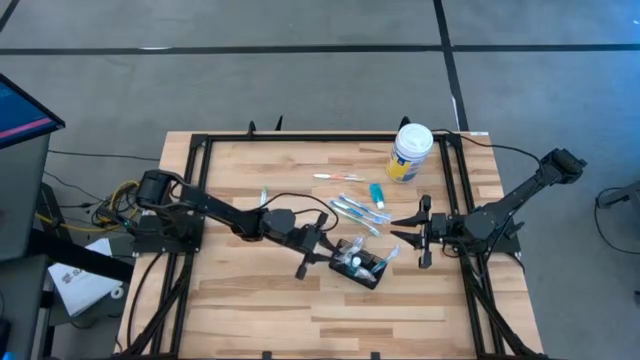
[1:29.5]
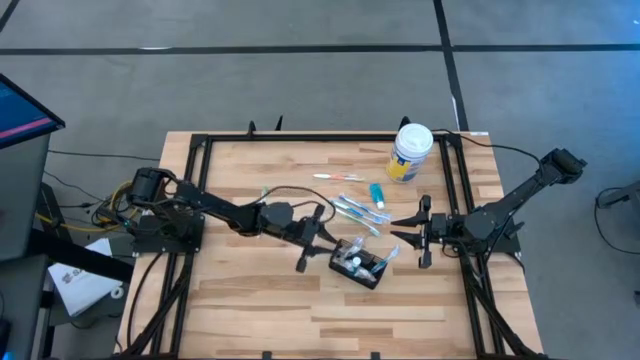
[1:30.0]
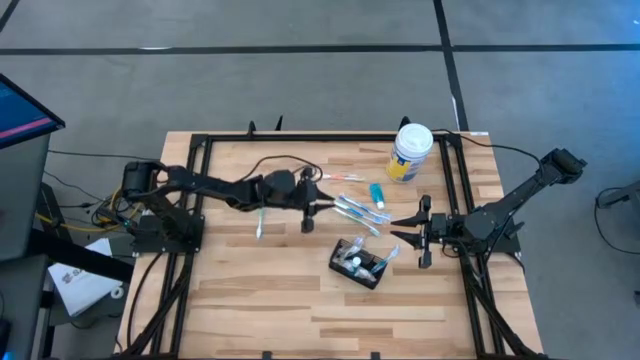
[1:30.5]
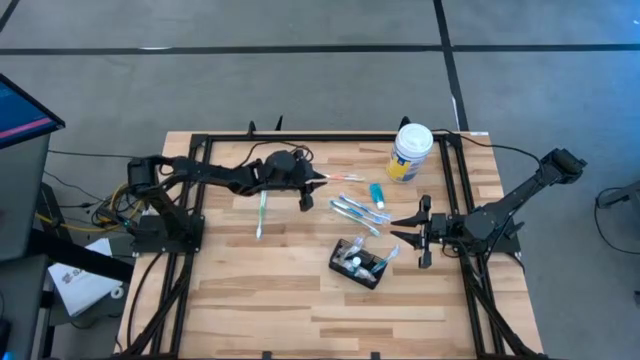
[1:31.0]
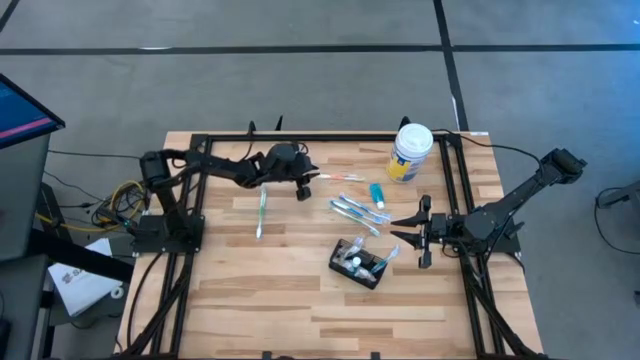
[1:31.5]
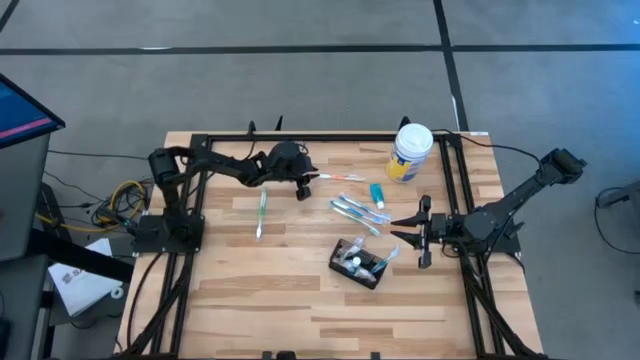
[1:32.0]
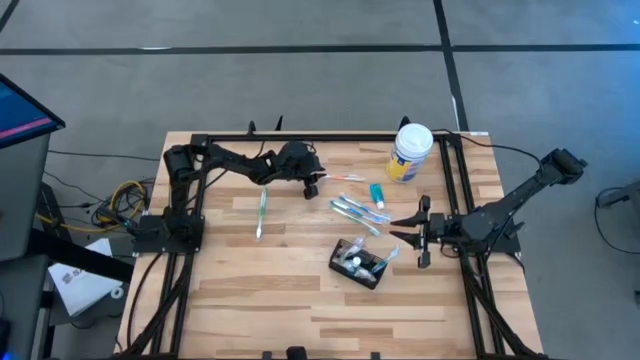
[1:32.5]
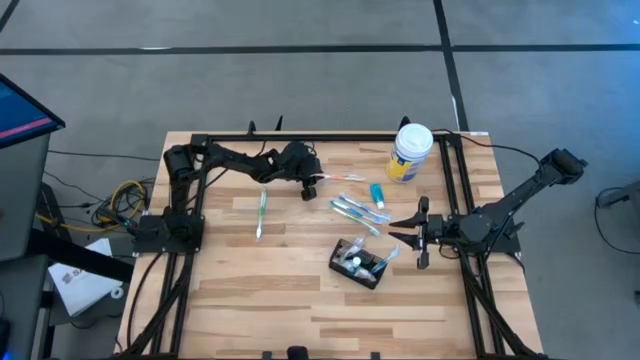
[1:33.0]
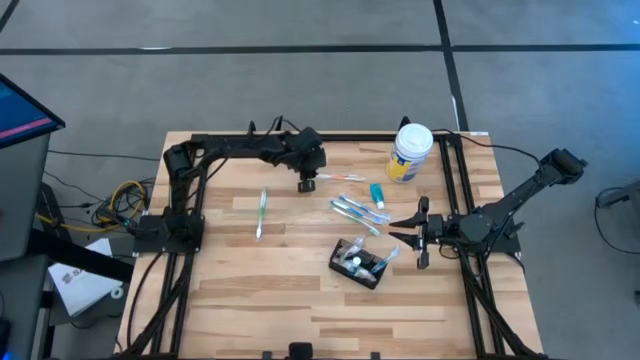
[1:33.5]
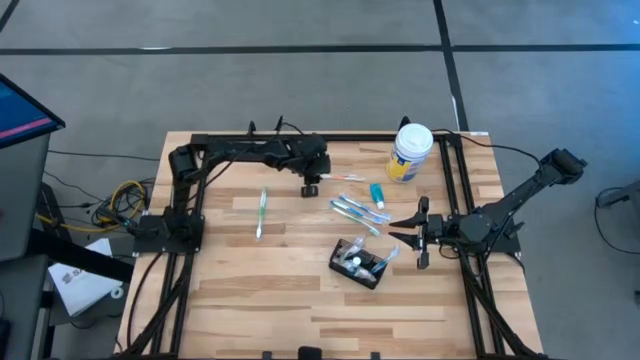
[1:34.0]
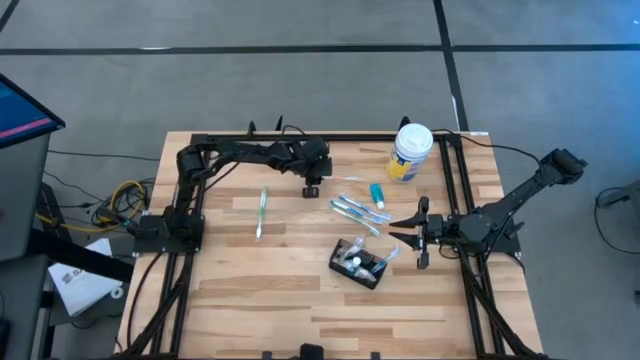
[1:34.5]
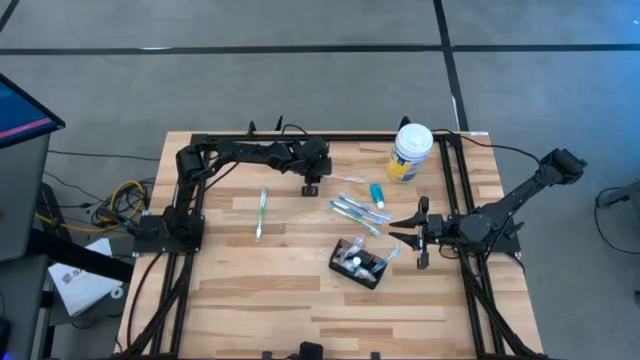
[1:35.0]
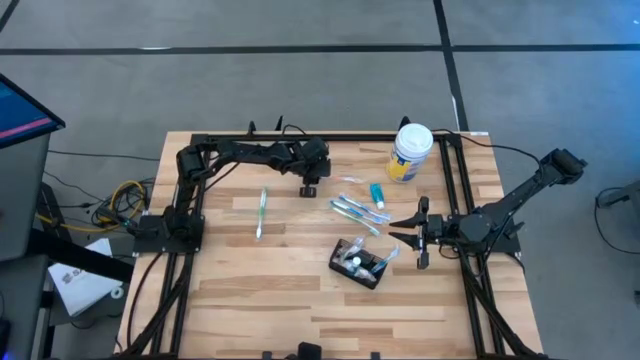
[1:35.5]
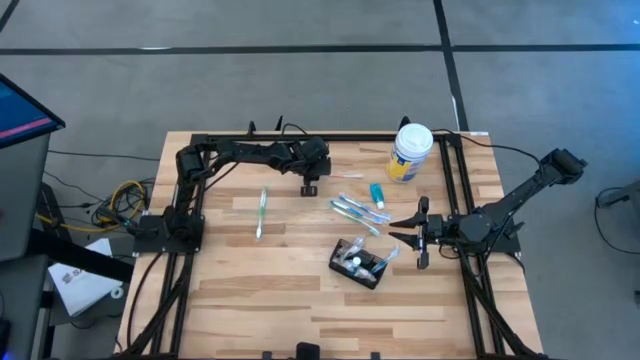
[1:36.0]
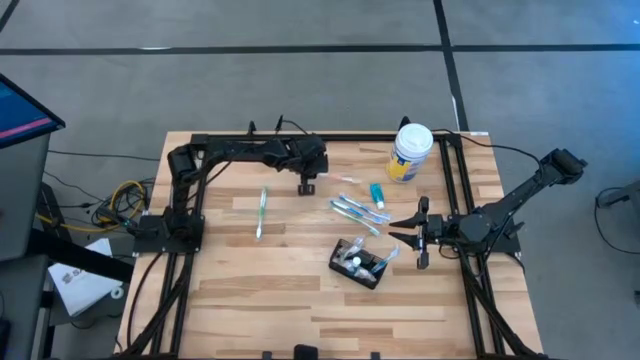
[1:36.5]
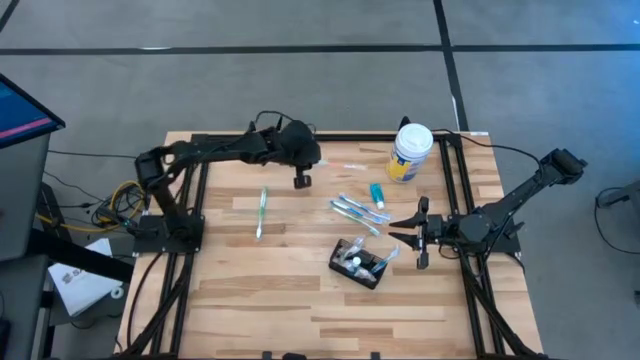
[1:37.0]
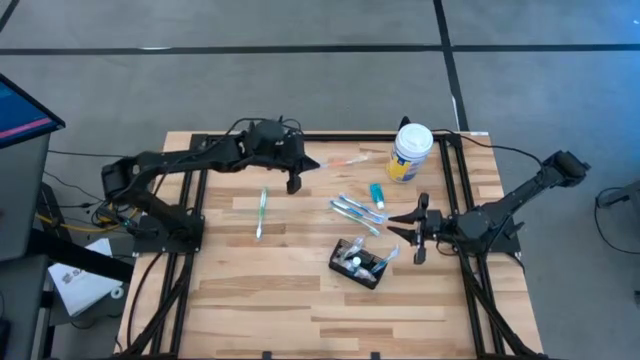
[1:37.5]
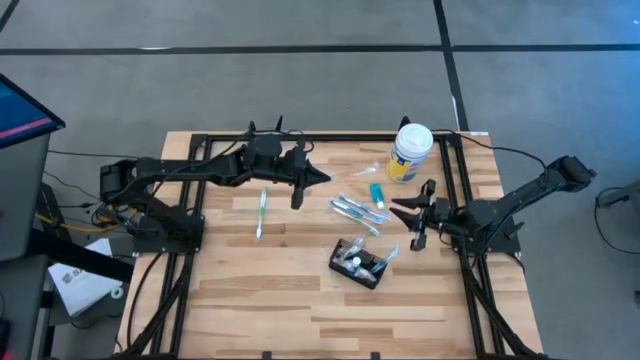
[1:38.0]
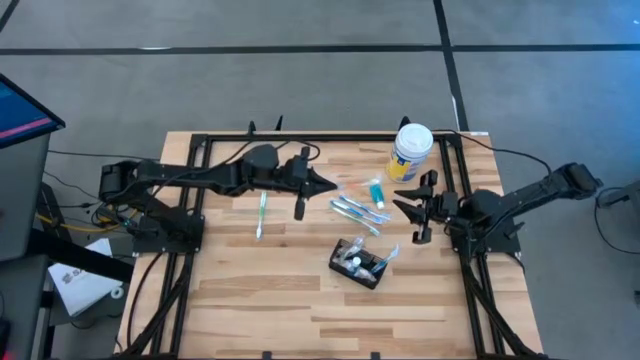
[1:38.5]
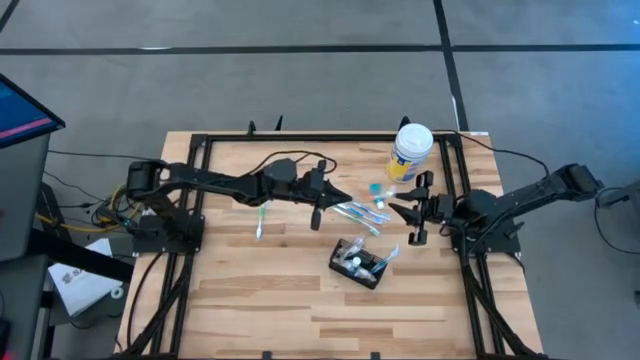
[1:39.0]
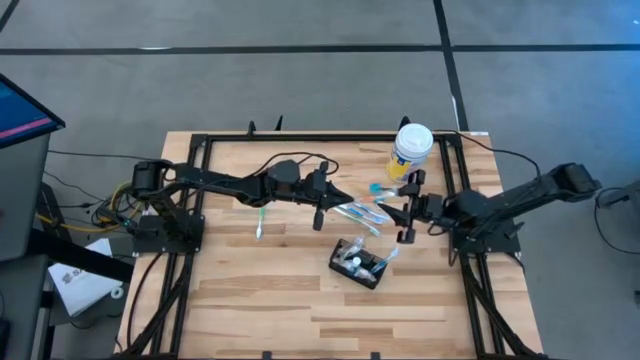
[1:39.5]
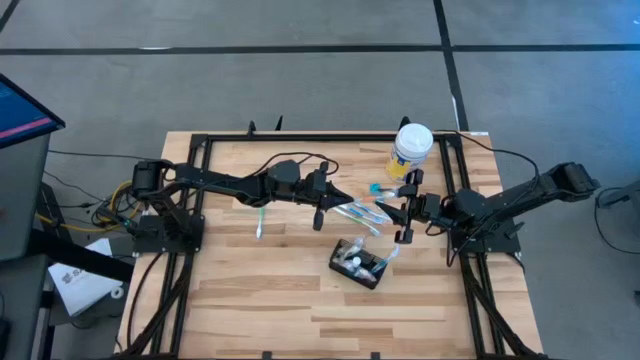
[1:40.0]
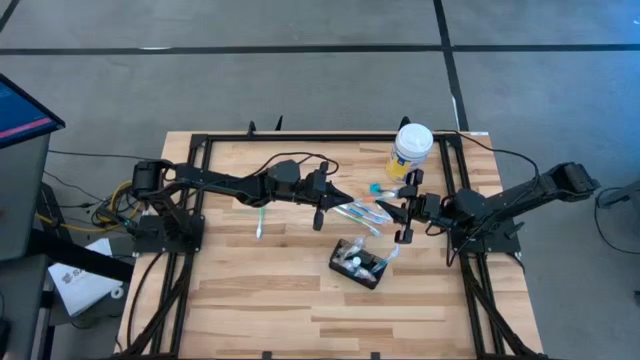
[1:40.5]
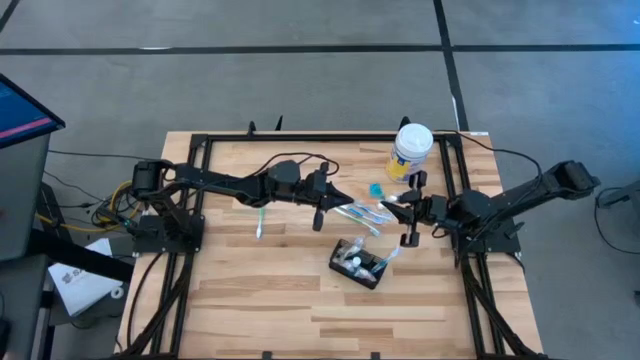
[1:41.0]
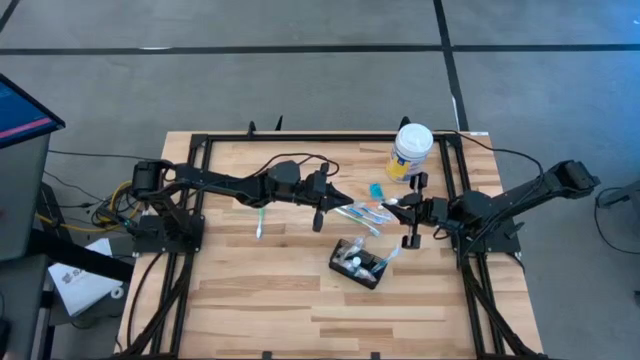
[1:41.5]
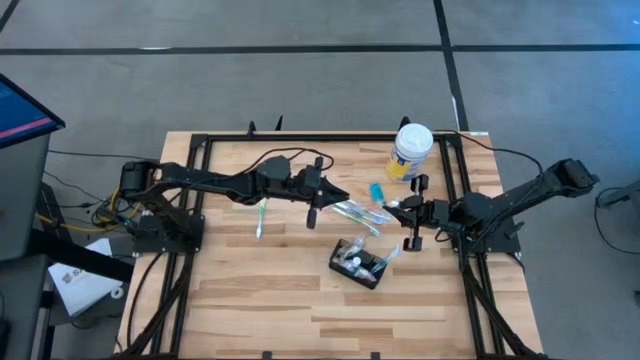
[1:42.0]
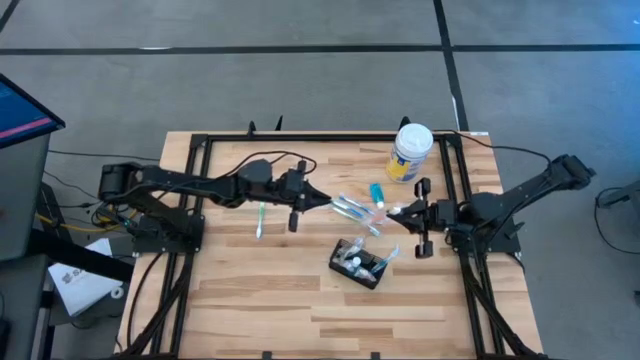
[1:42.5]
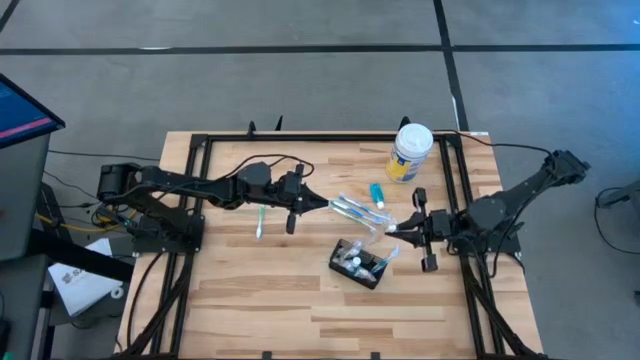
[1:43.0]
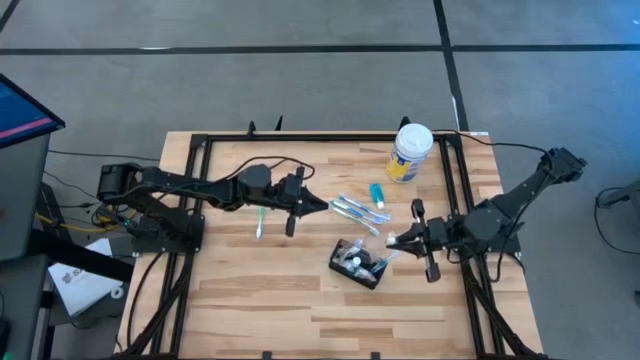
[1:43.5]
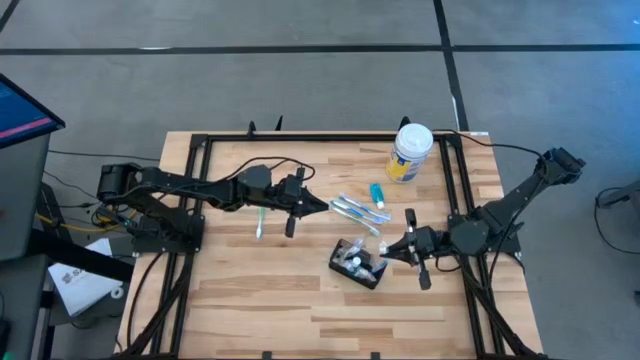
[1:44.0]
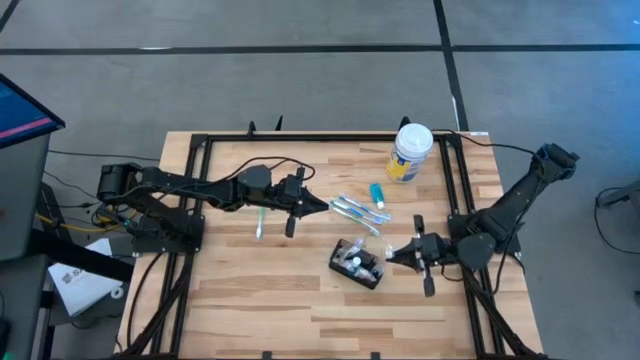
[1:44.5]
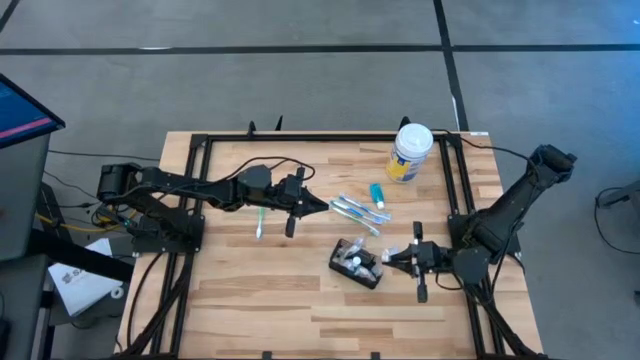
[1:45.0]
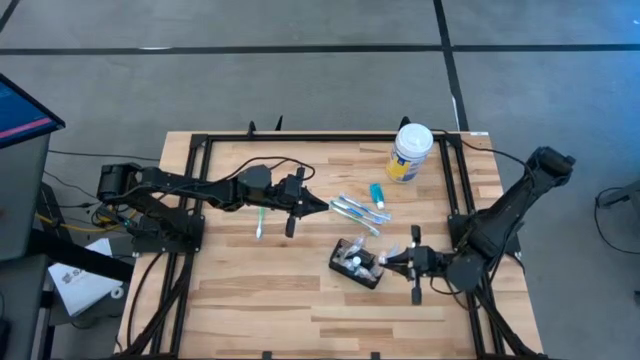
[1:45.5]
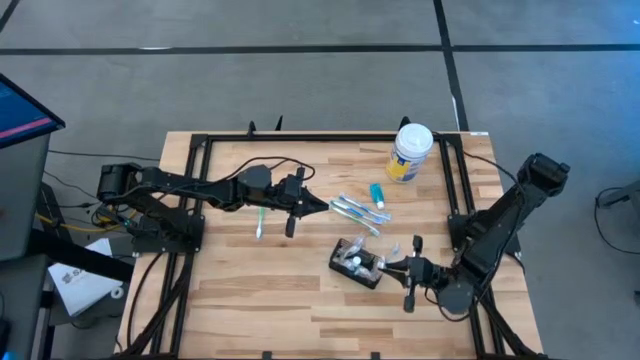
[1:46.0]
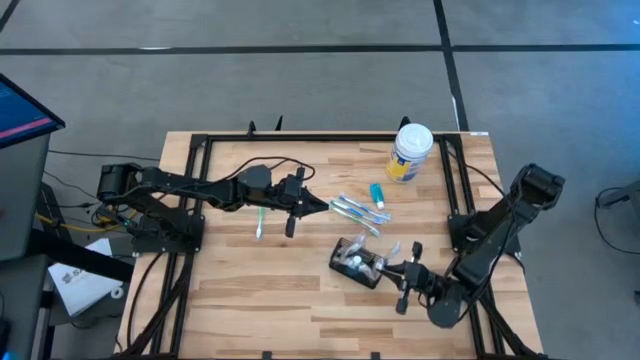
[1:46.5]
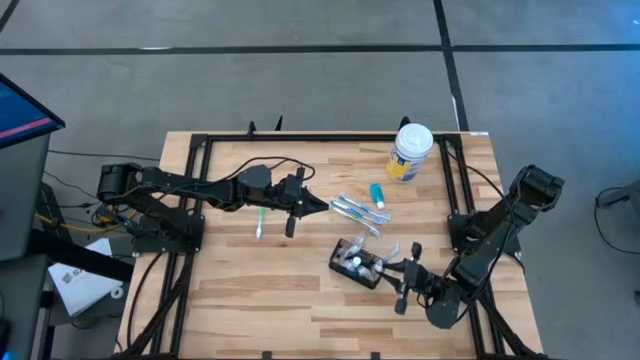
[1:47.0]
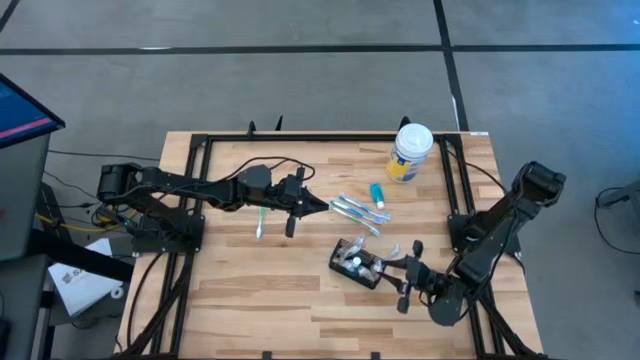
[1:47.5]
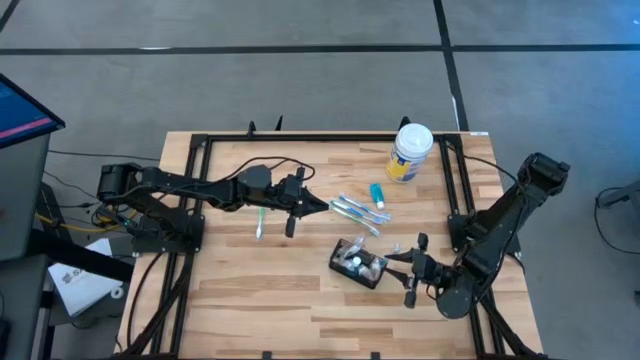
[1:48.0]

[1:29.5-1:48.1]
Task: Pick & Place toothbrushing station
Put the orange toothbrush into the mesh organizer

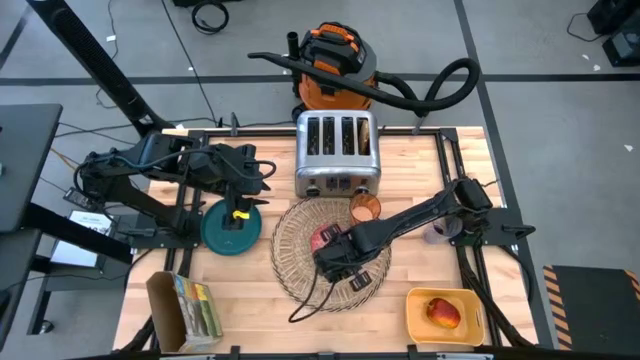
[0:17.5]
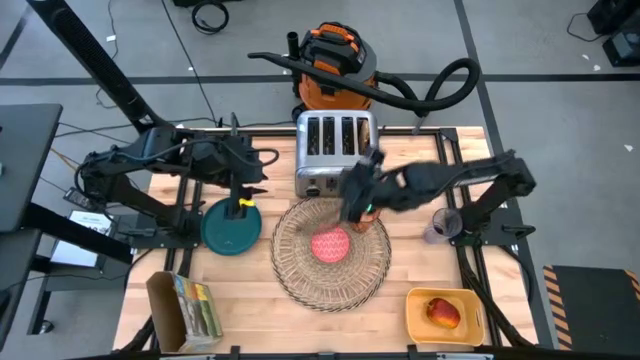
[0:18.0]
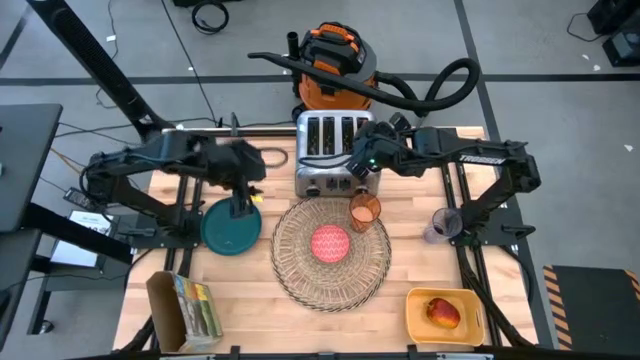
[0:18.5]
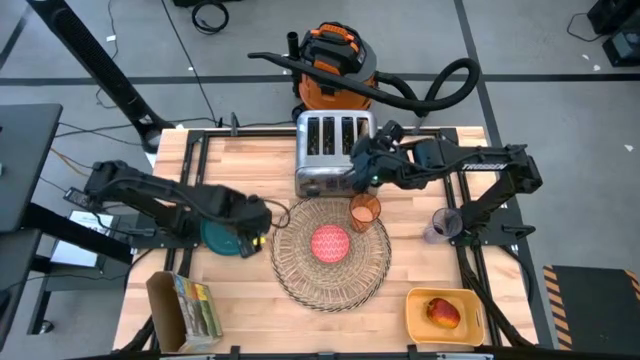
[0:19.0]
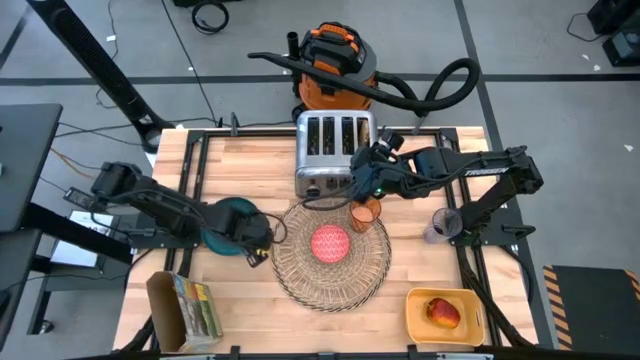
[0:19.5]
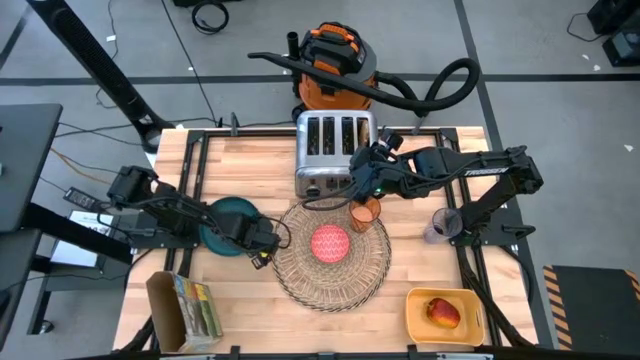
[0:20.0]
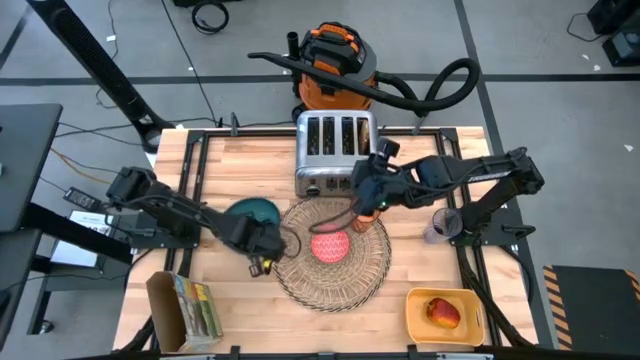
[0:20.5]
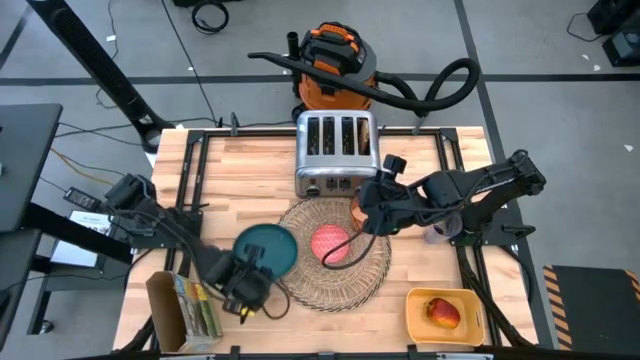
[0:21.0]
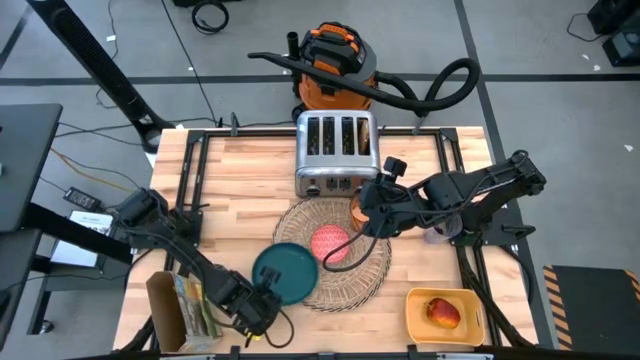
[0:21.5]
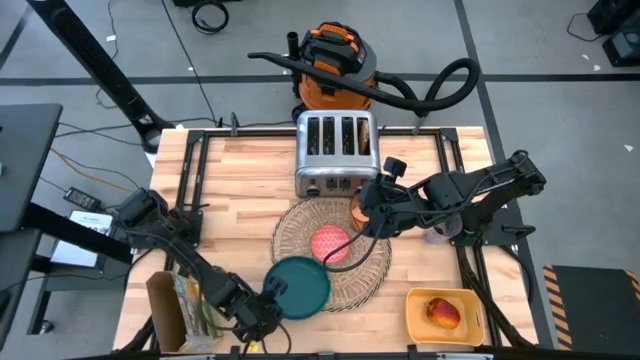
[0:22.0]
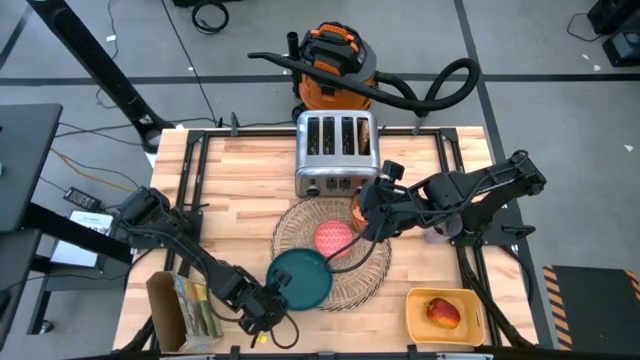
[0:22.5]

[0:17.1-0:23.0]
Task: Arrange a breakfast setting
Put the blue plate on the brown placemat to the bottom left of the red patterned bowl
